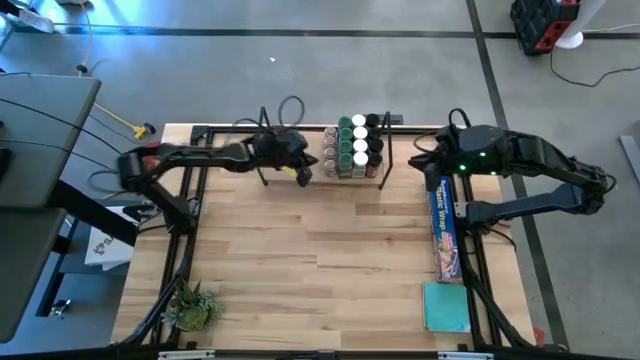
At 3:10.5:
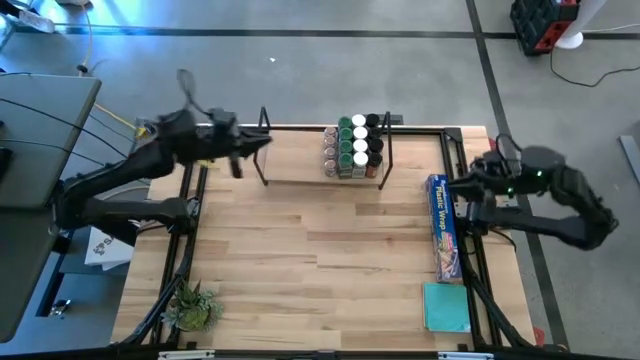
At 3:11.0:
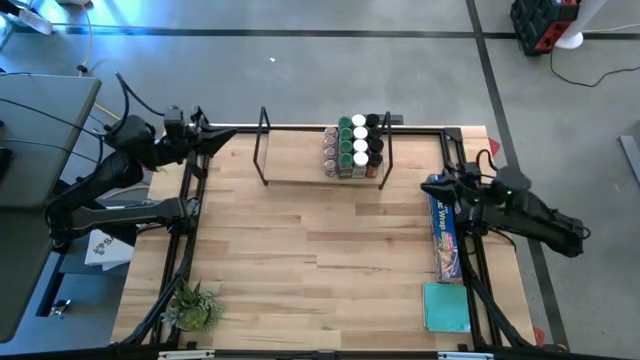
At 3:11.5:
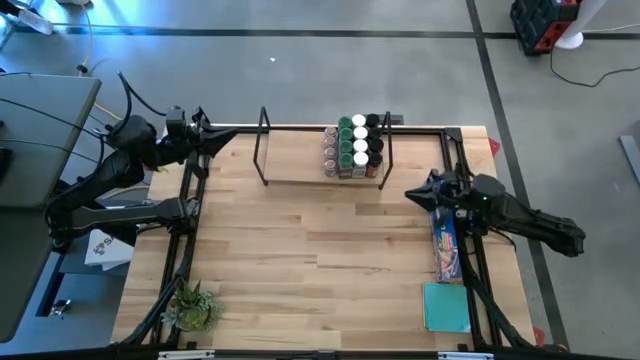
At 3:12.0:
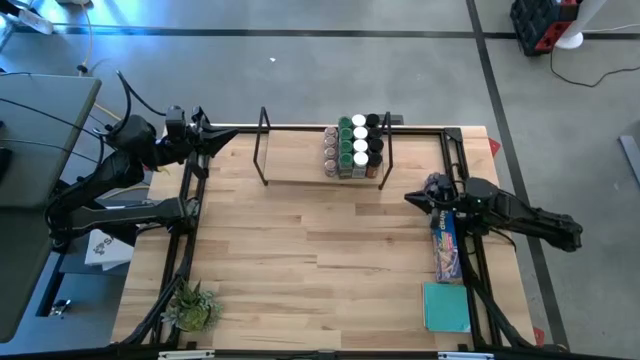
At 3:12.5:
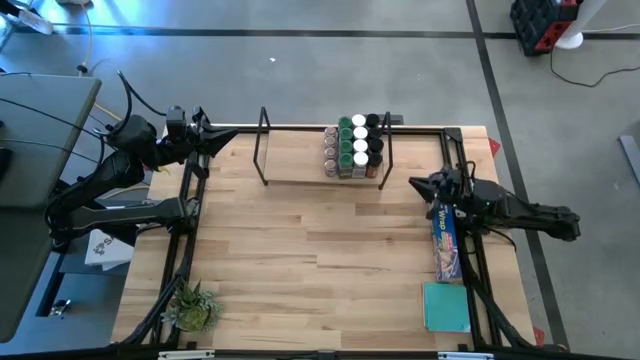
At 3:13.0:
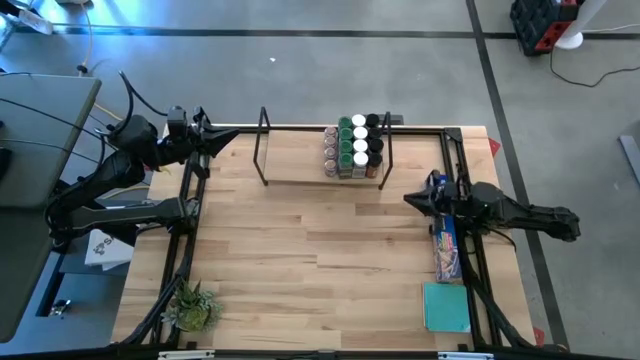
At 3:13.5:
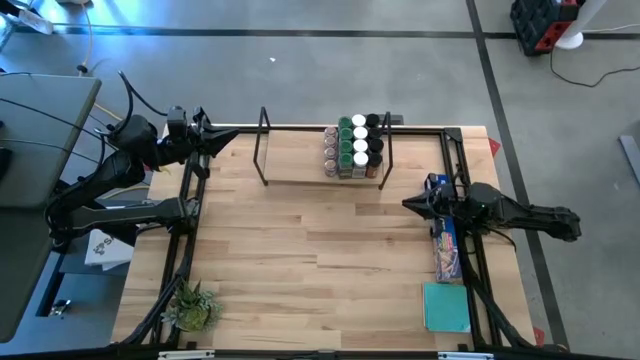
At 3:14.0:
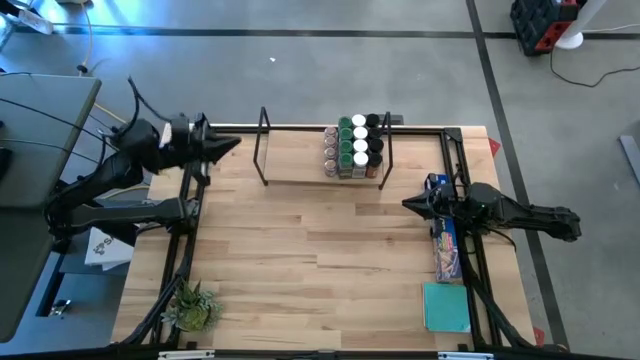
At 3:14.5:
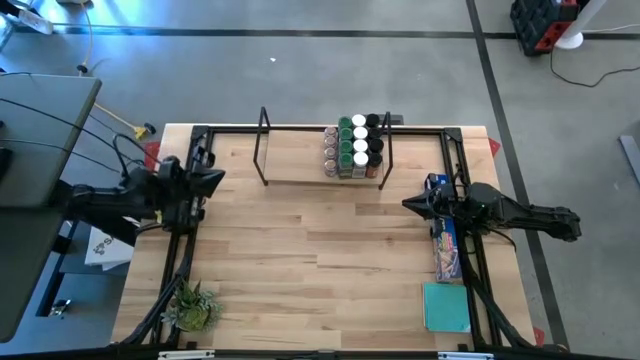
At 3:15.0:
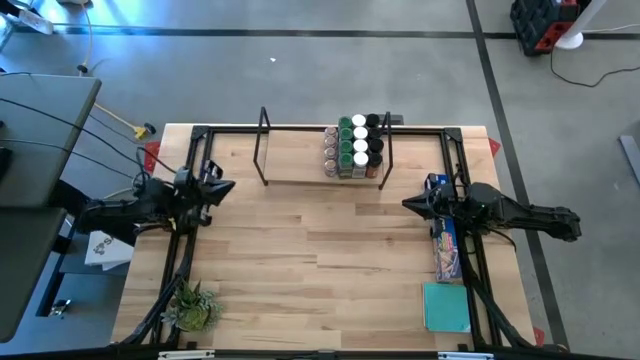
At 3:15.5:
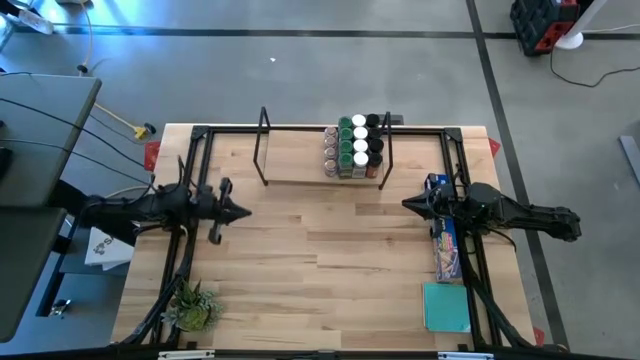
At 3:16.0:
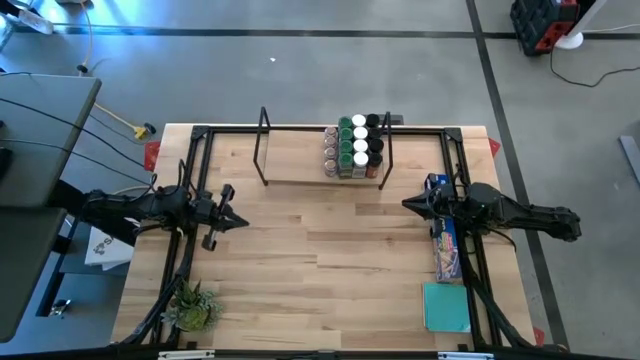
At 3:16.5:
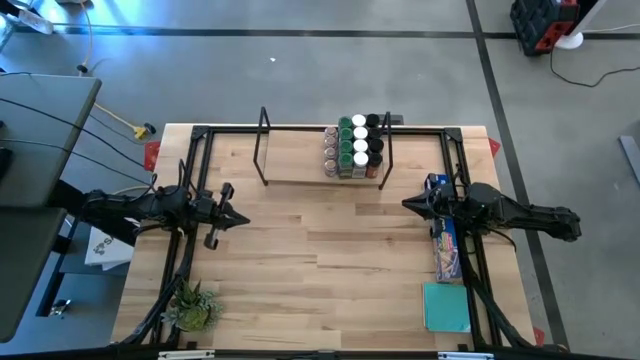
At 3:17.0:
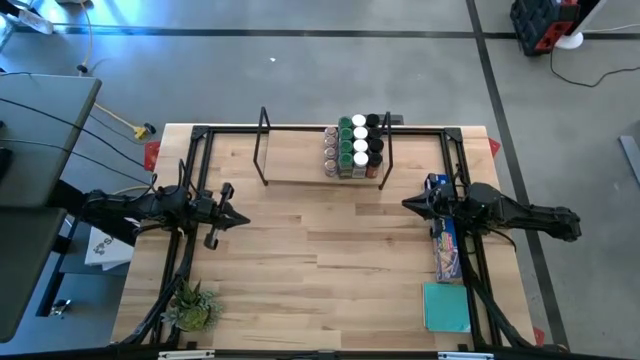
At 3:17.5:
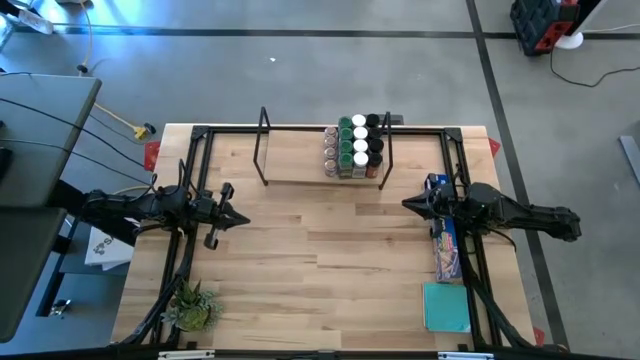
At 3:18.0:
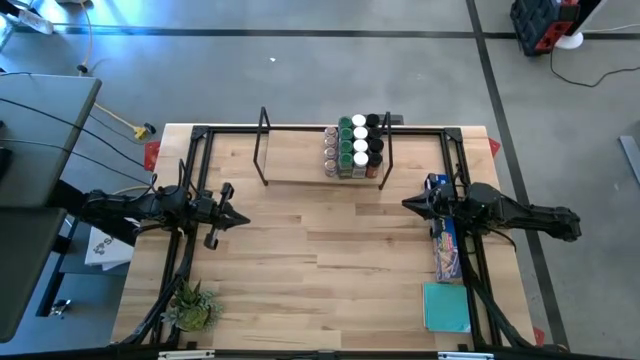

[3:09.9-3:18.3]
Task: Shelf spices
Return to Home Position

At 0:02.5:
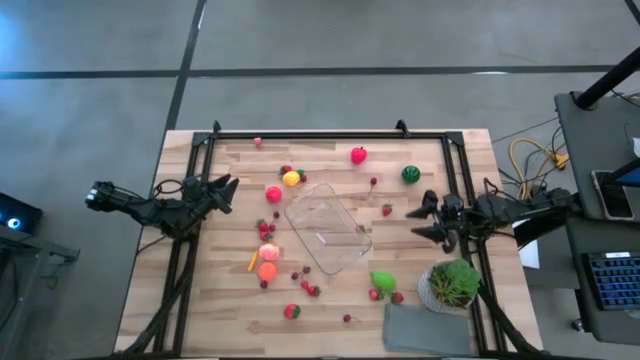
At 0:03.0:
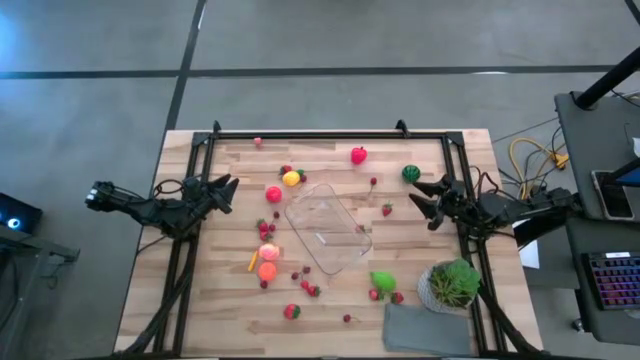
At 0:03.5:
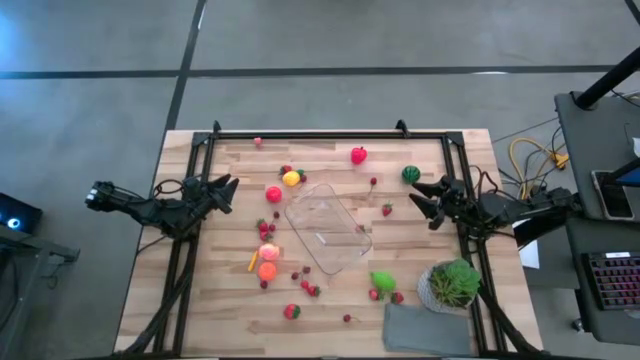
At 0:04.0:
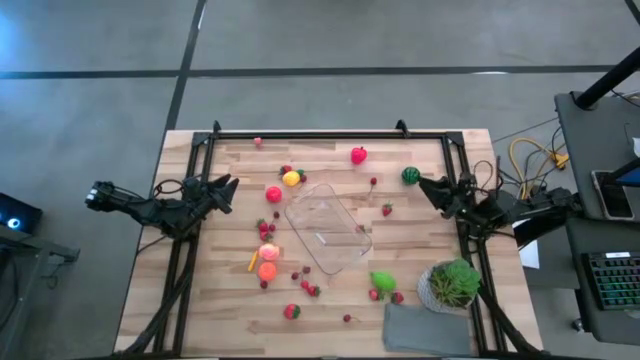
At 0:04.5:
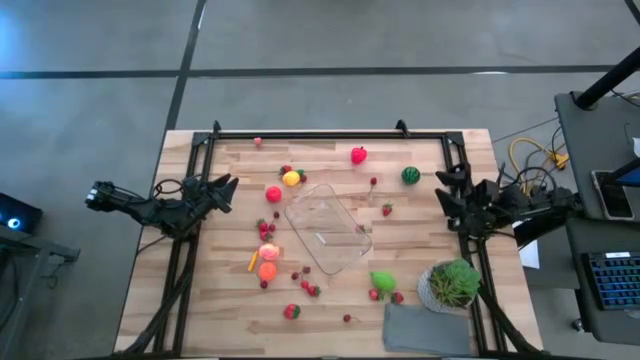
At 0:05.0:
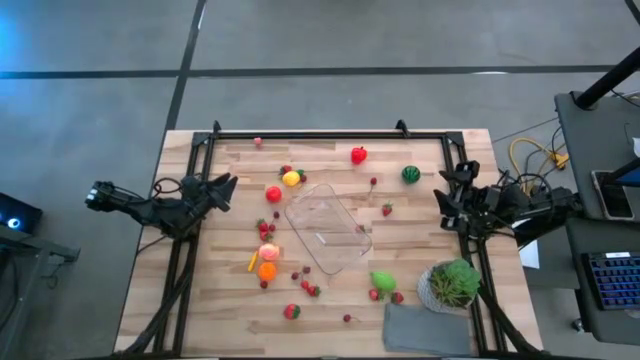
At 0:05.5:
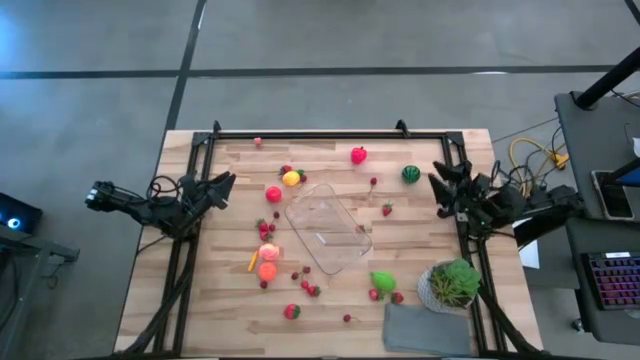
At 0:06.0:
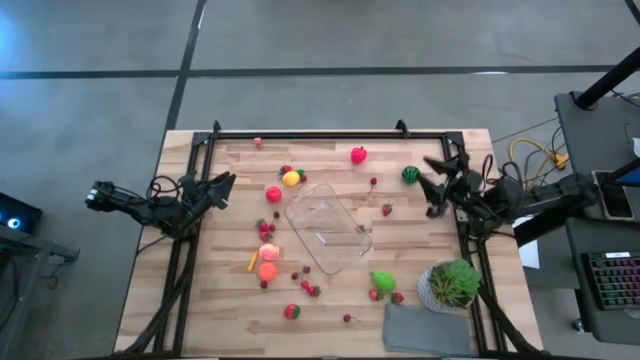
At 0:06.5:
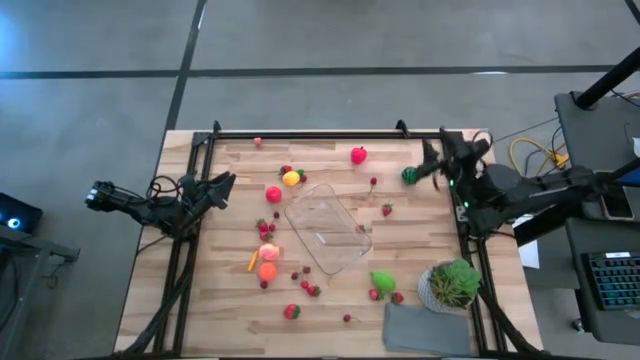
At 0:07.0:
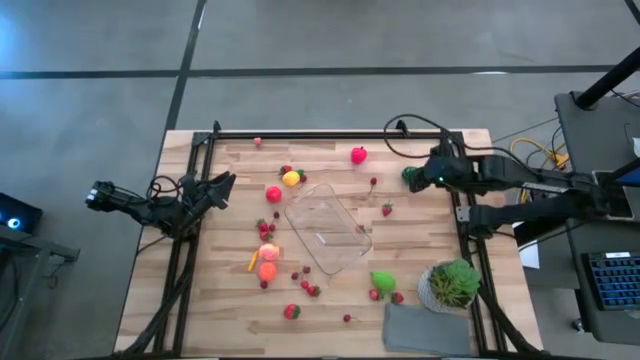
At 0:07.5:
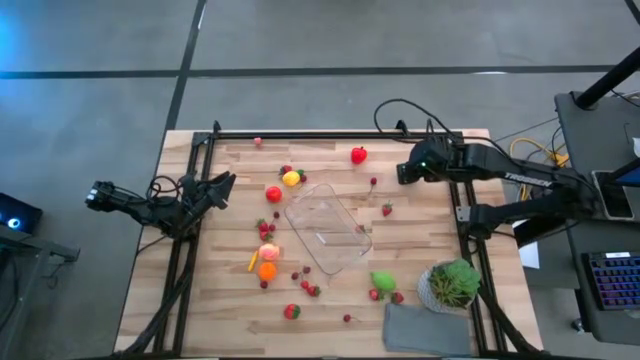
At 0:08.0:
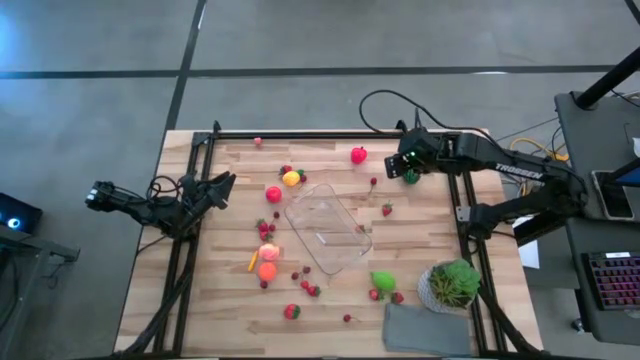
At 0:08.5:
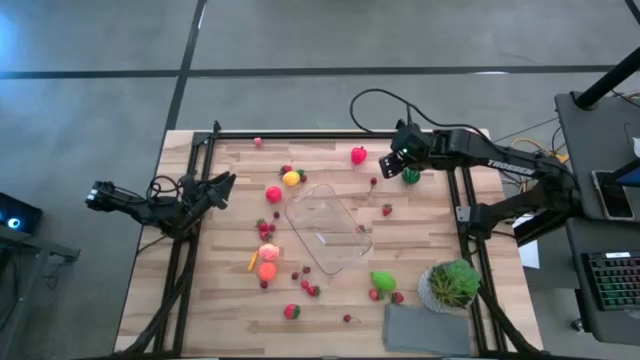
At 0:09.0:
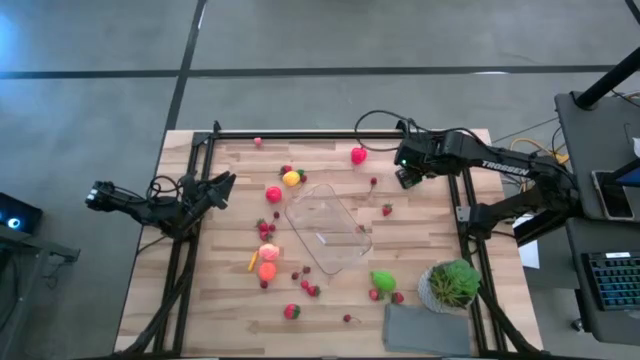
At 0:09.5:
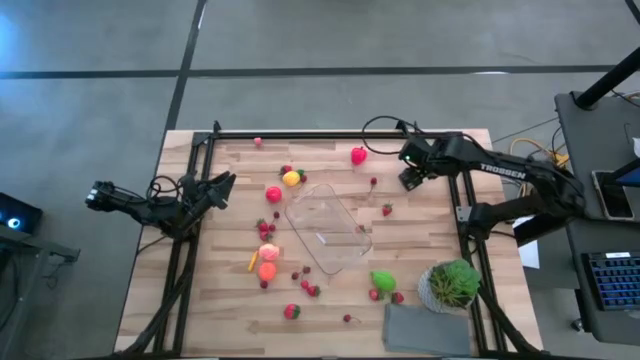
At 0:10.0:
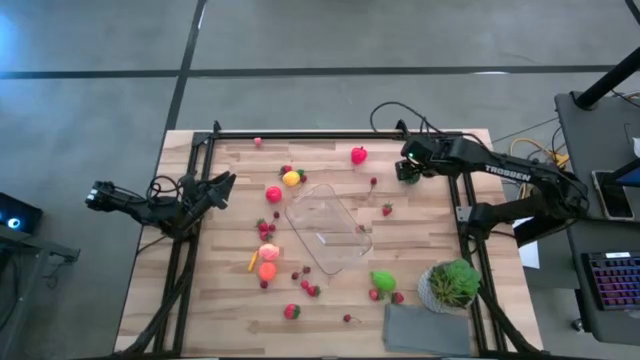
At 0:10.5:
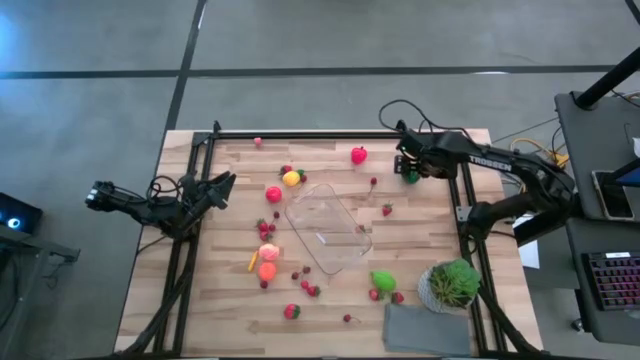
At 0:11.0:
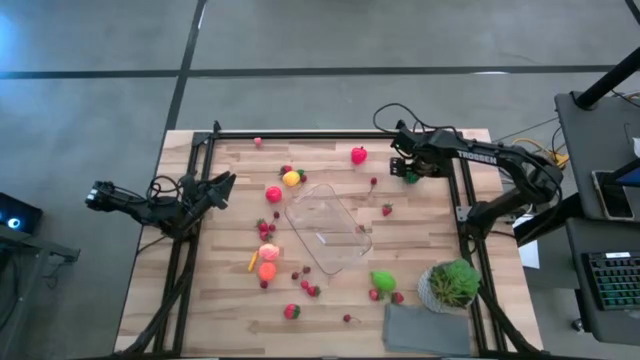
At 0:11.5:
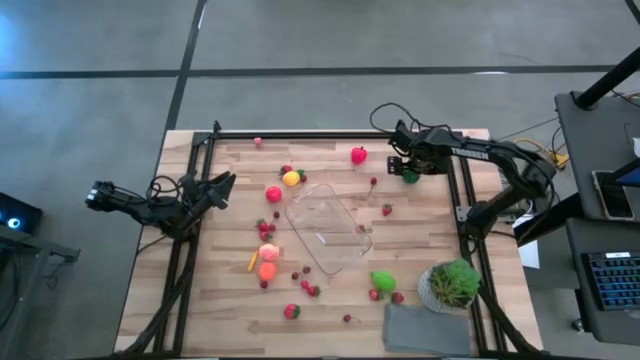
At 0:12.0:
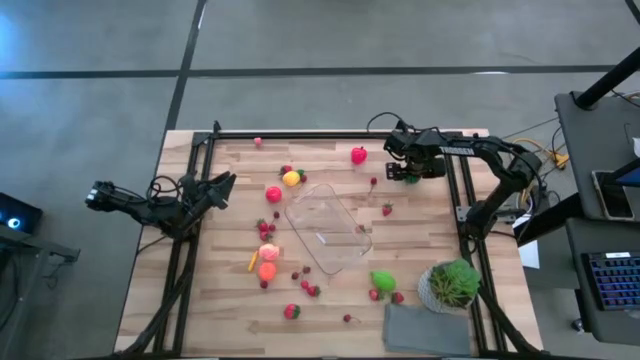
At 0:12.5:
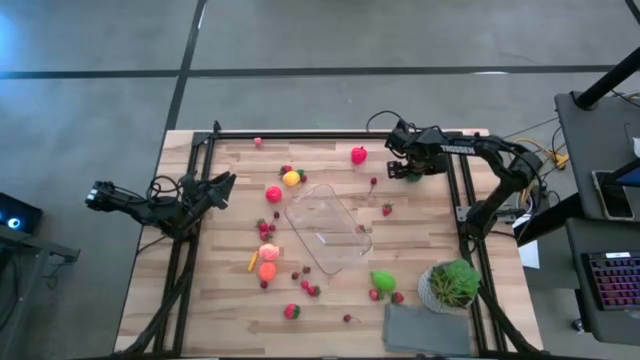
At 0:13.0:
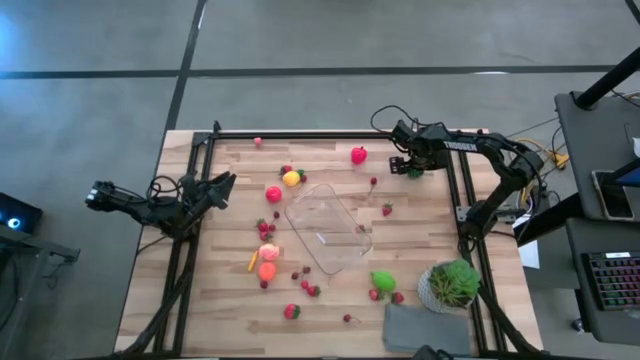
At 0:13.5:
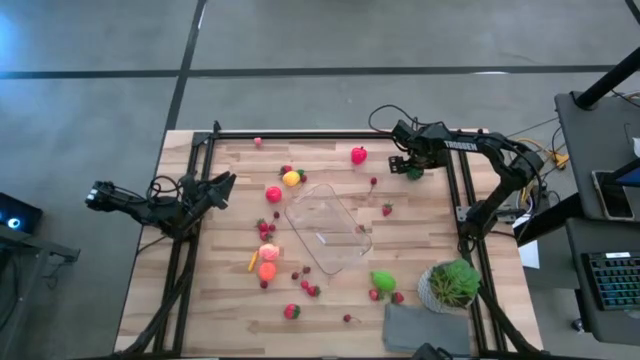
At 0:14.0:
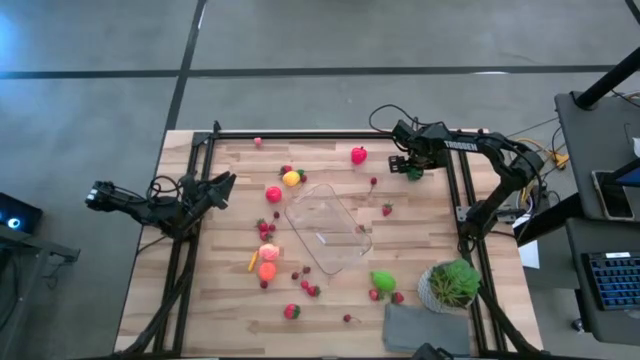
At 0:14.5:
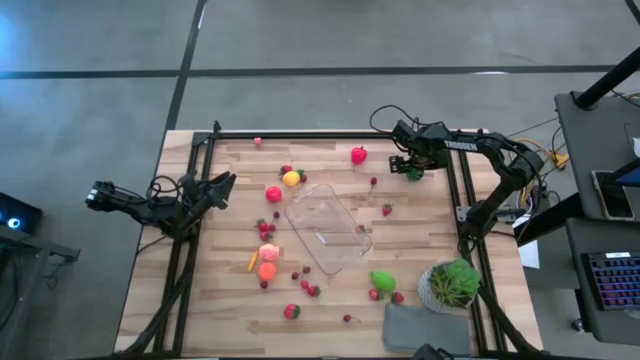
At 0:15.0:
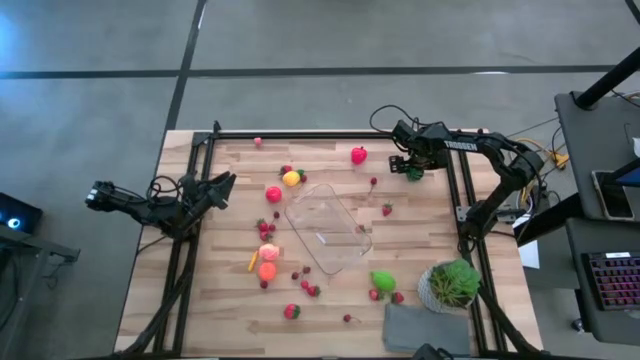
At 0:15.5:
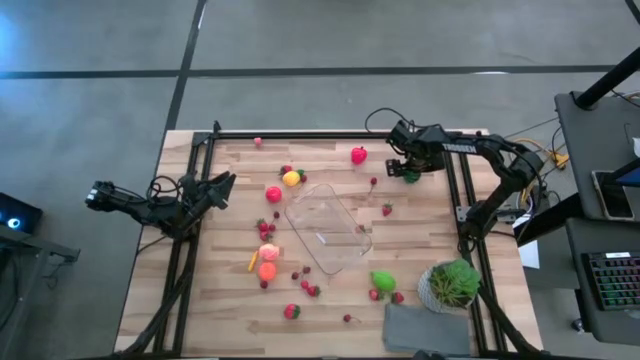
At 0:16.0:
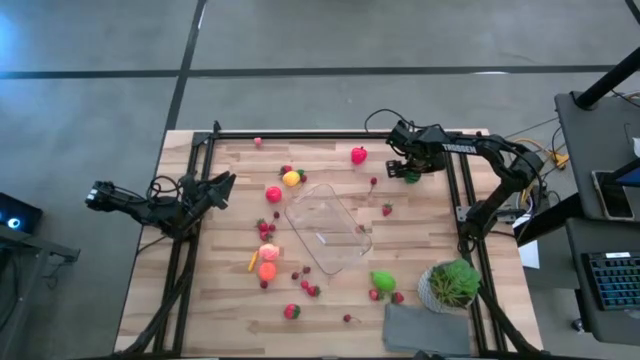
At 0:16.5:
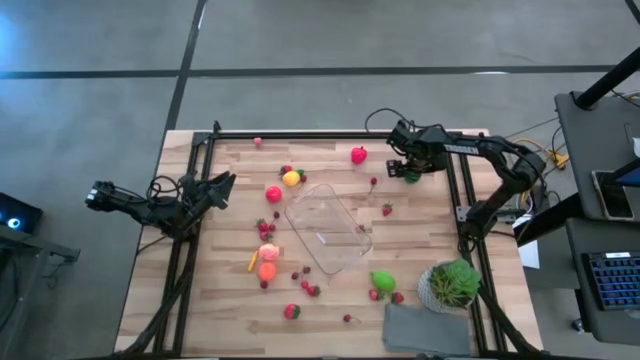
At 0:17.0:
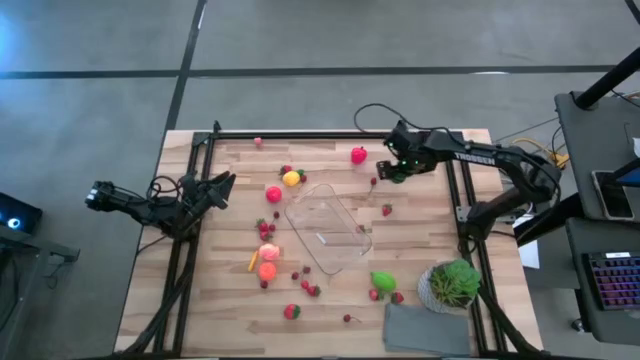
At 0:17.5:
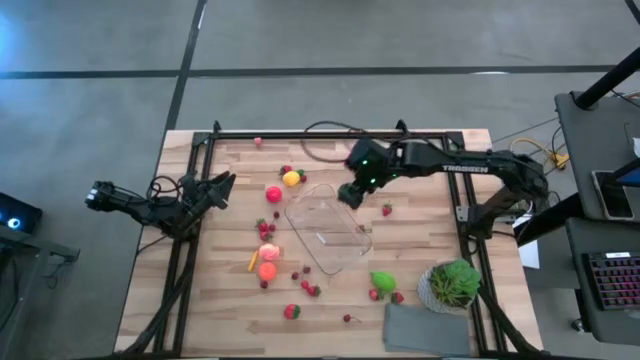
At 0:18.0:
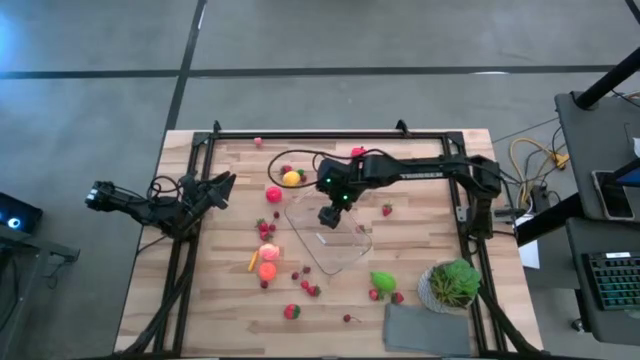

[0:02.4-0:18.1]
Task: Pick and placing Produce into tupperware
Put the green watermelon into the transparent bin
